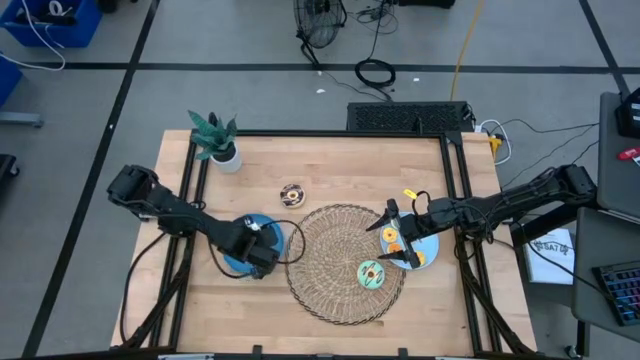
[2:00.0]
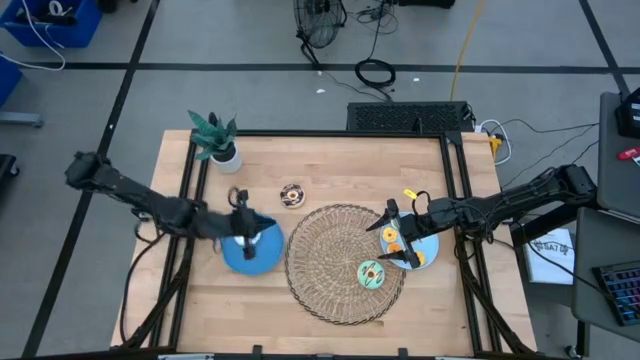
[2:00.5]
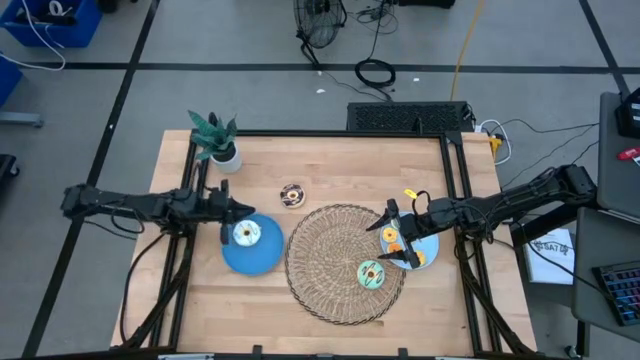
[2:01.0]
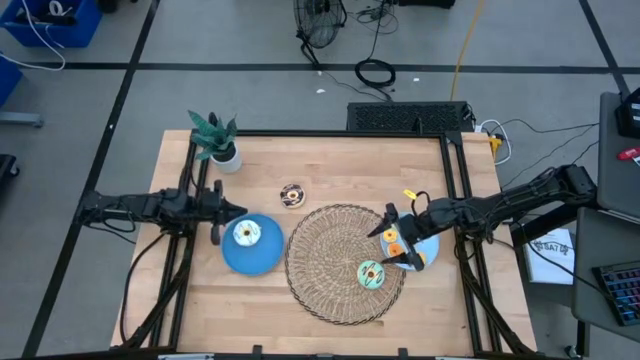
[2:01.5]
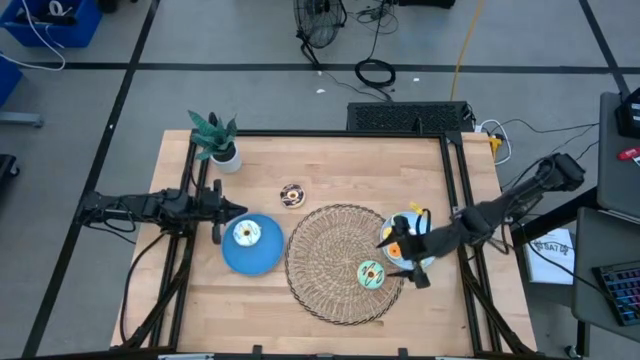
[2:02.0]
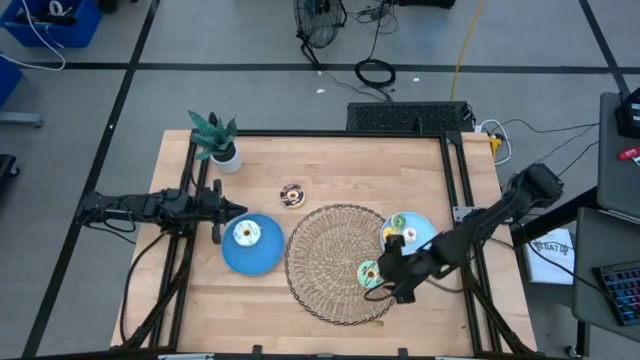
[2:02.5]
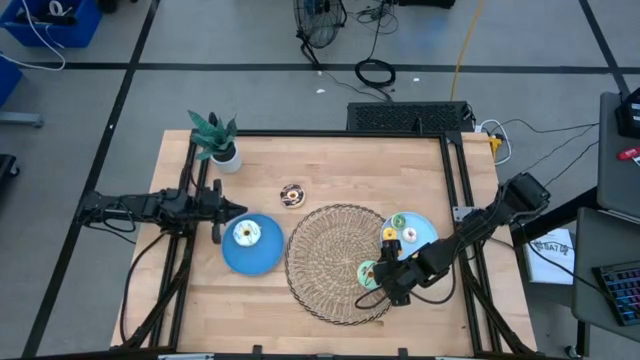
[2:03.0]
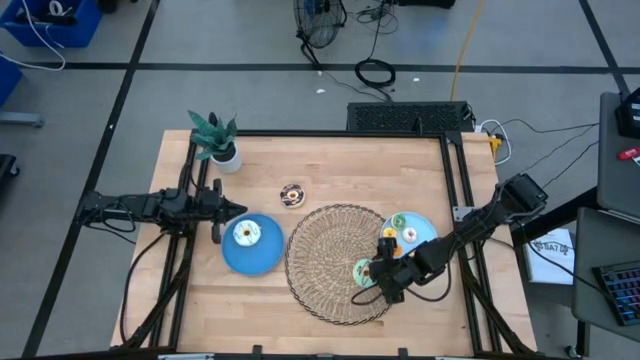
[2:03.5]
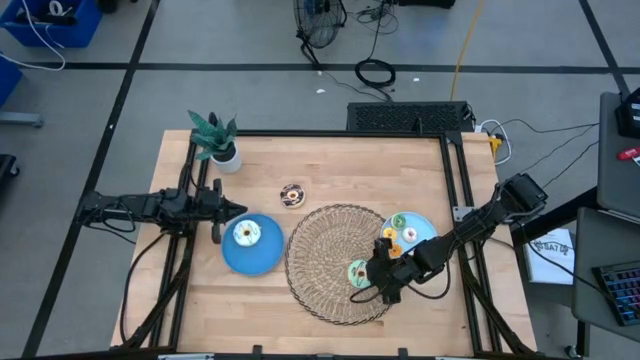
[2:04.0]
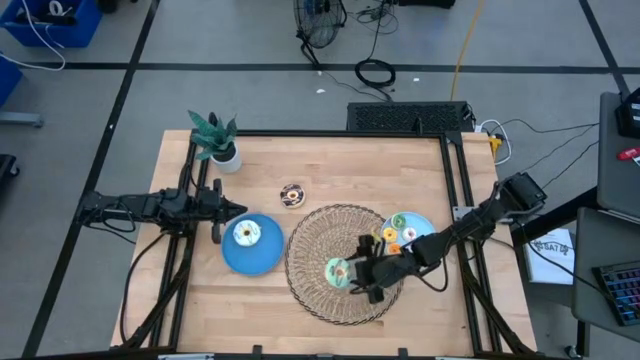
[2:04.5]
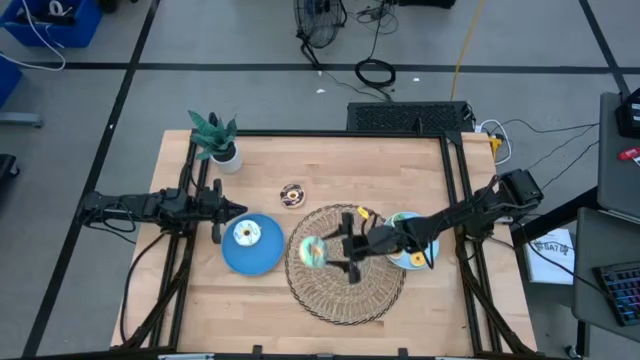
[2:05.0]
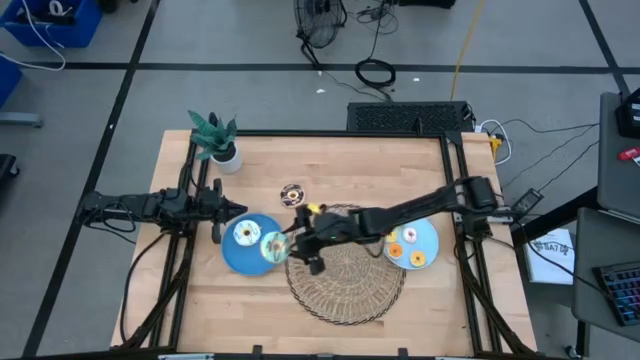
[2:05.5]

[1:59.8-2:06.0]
Task: Pick & Place donuts
Put the large green donut on the blue plate

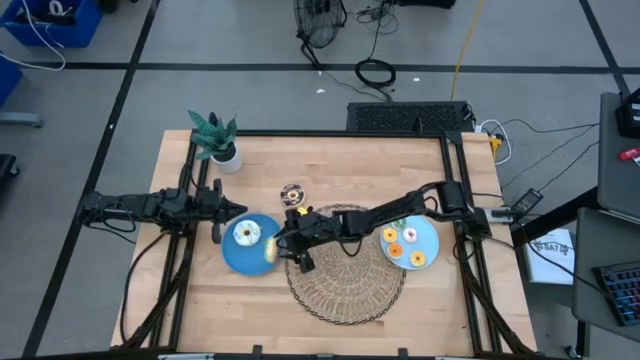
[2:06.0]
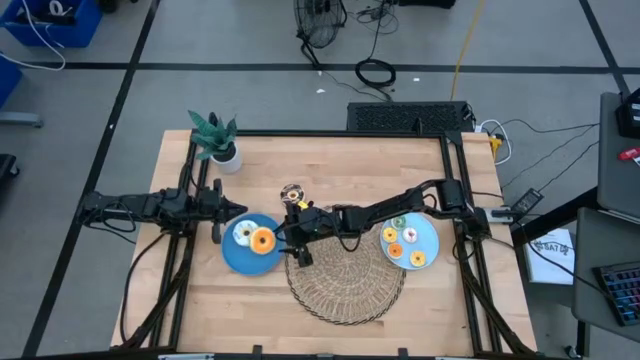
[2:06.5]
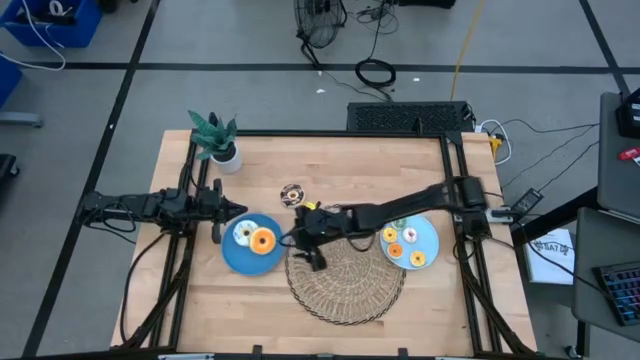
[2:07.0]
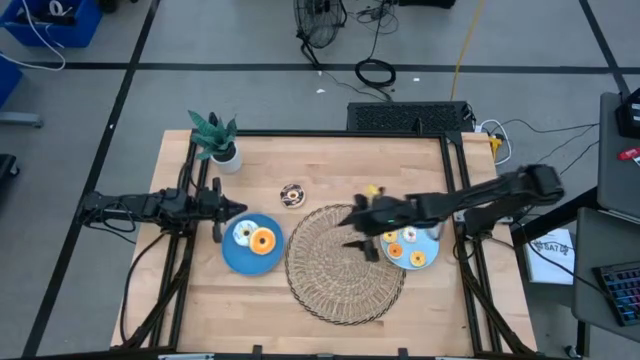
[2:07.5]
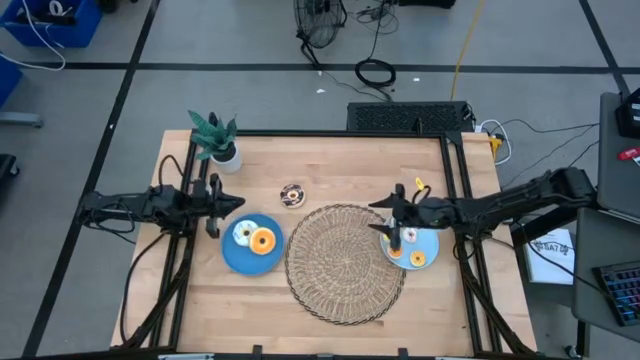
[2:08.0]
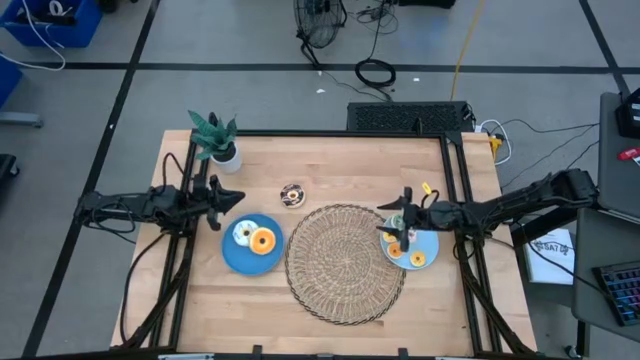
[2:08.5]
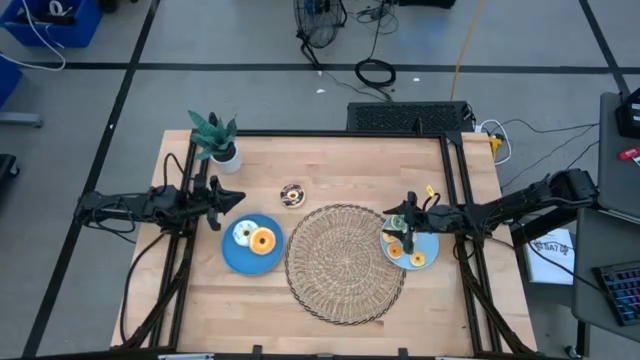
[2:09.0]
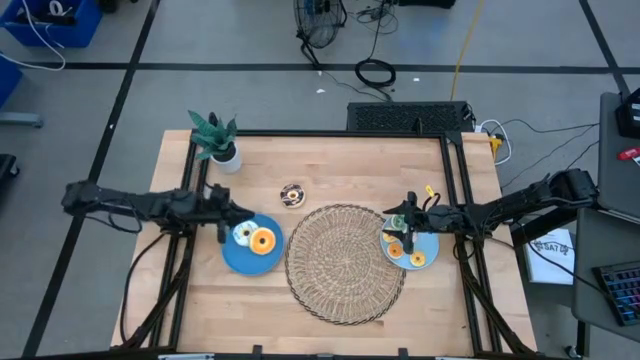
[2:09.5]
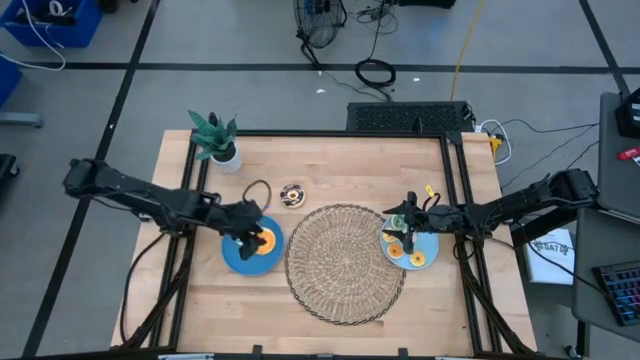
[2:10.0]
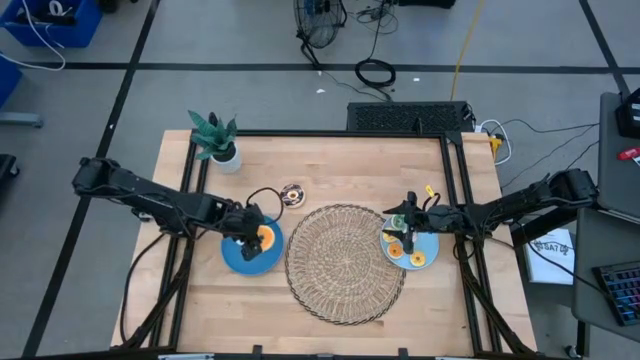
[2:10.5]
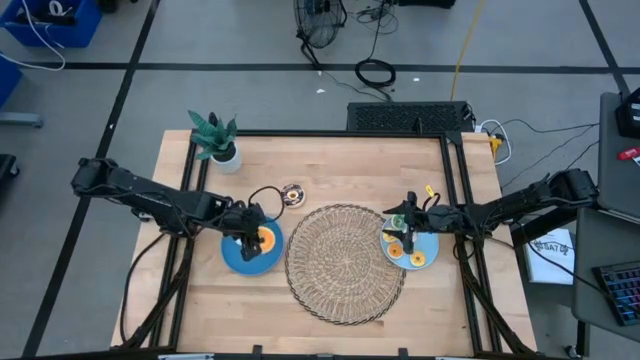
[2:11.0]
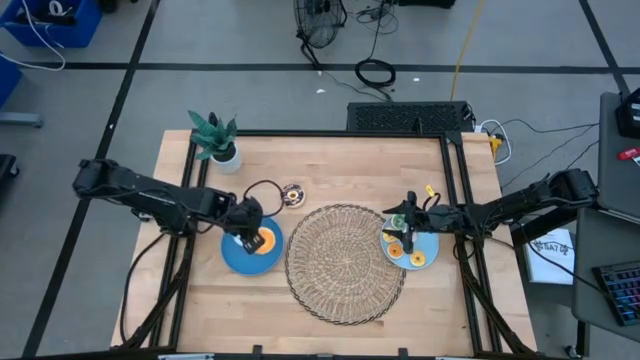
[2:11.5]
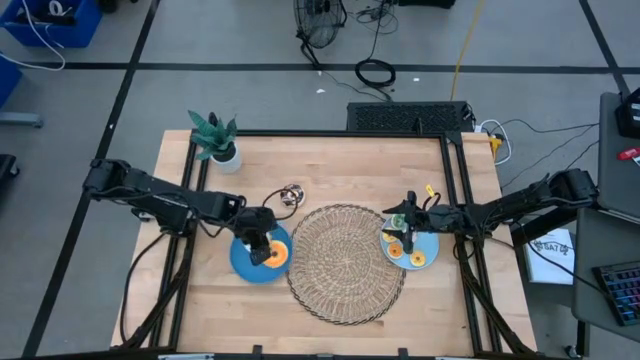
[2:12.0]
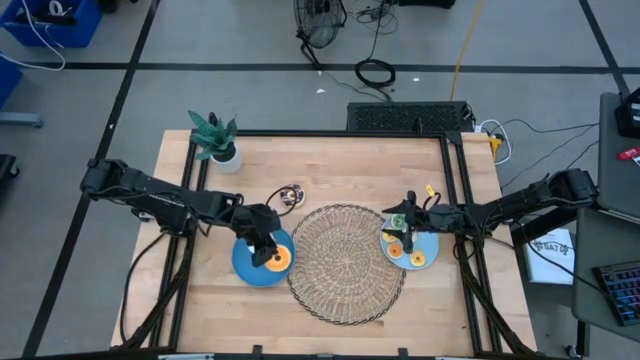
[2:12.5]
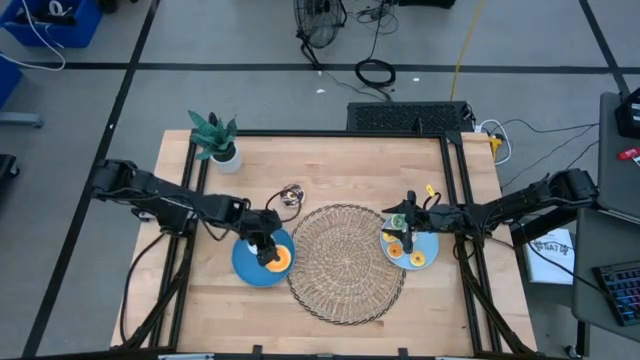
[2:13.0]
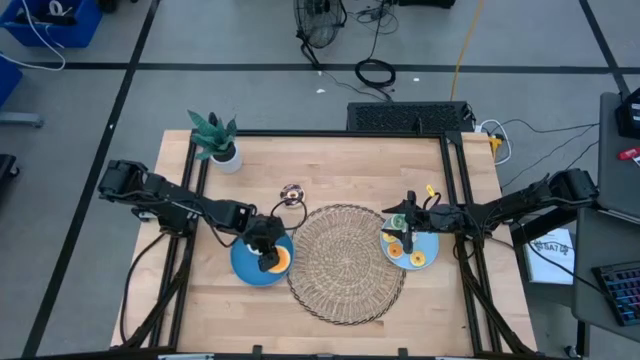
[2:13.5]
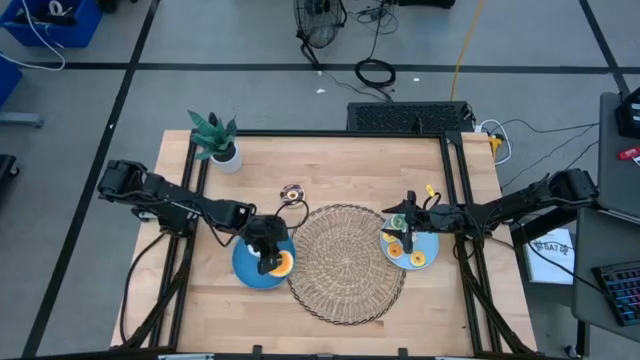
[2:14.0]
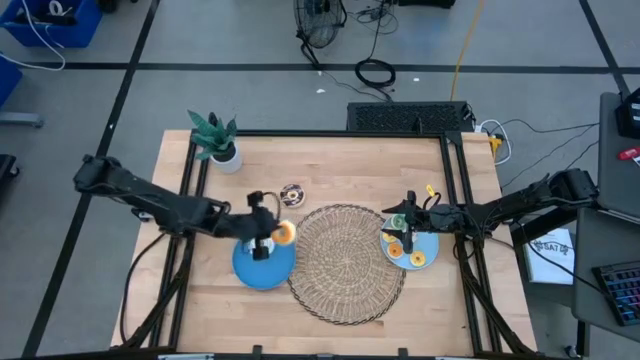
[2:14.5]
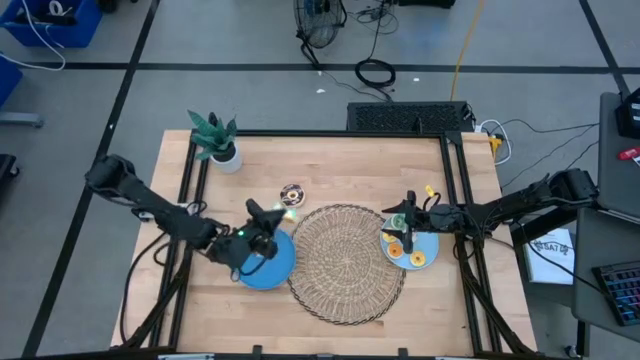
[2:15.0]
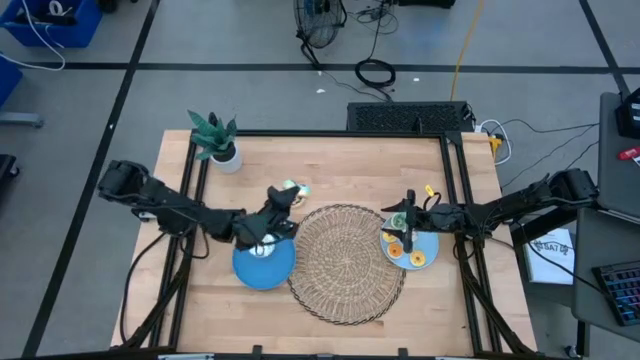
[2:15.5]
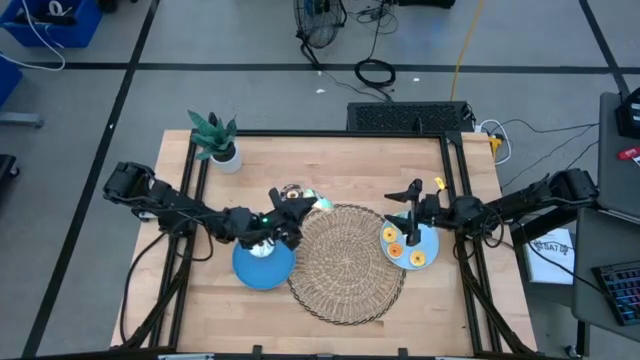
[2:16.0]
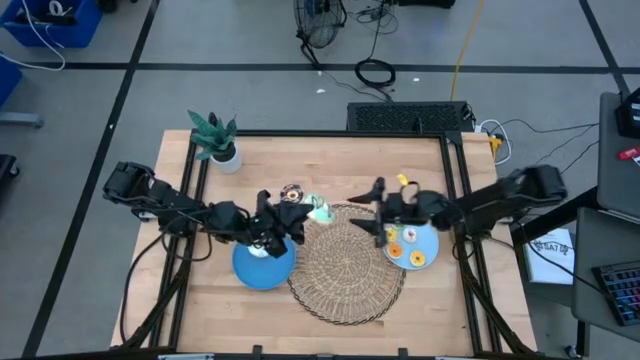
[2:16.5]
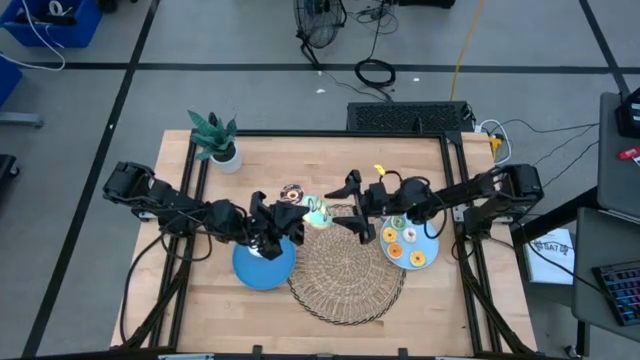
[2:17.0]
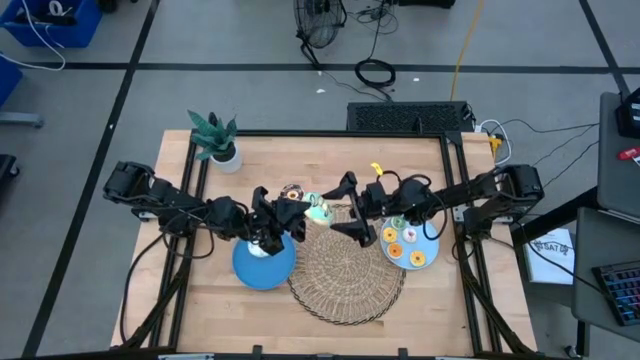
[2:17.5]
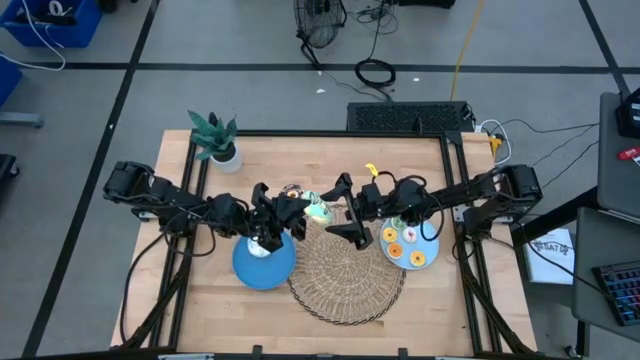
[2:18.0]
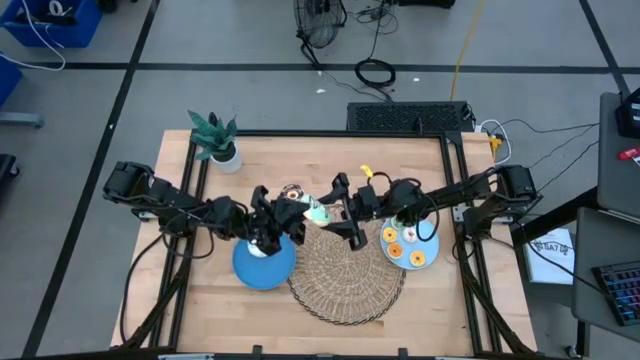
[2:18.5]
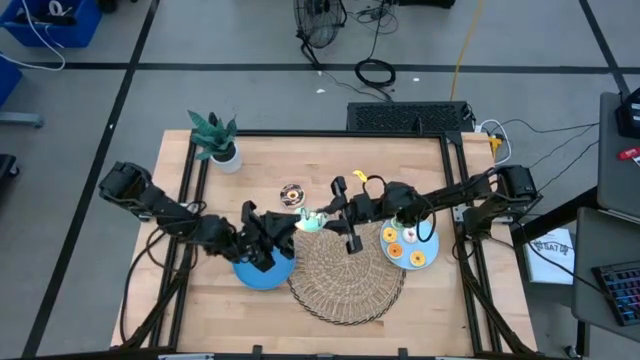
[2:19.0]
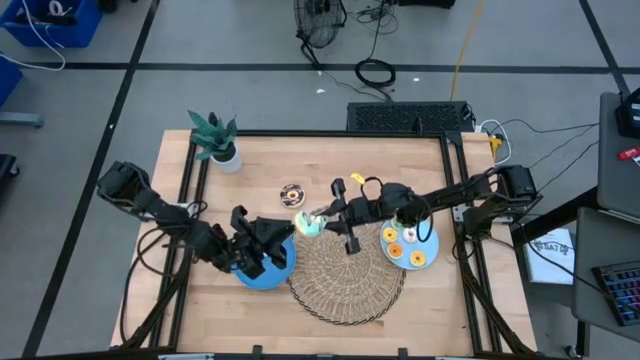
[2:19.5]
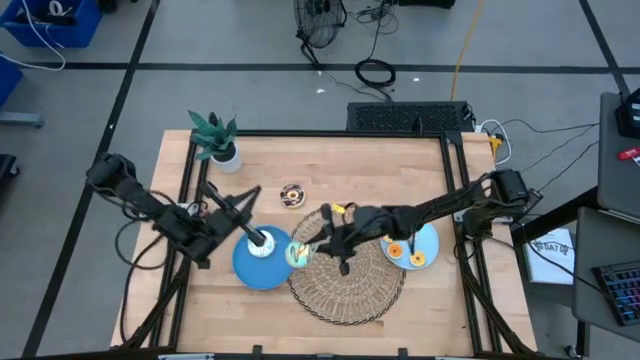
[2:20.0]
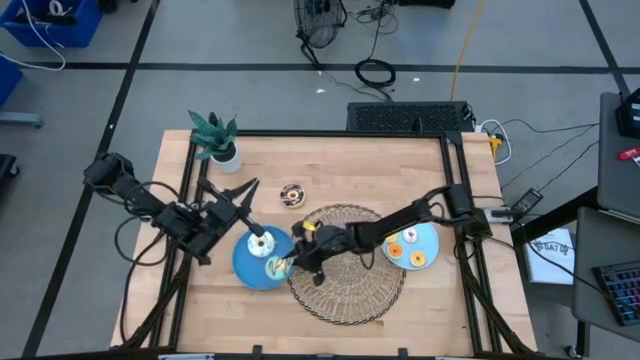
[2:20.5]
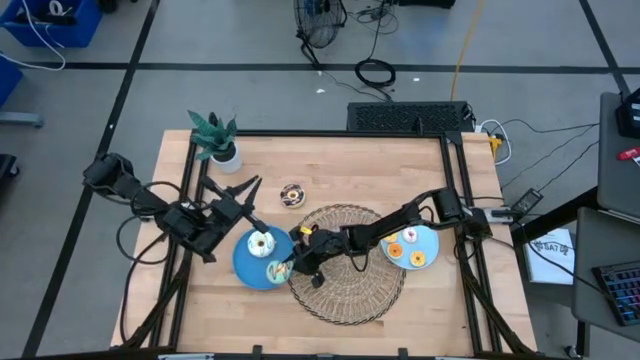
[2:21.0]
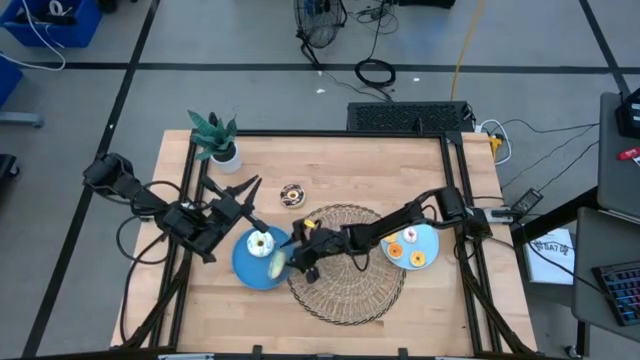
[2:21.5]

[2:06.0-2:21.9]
Put the large green donut on the blue plate
